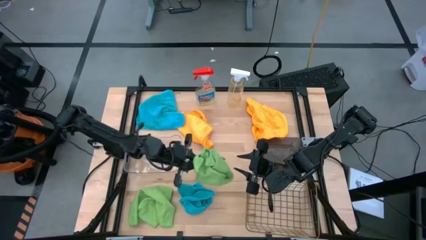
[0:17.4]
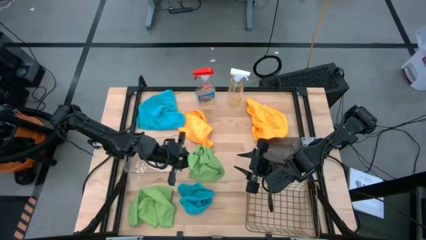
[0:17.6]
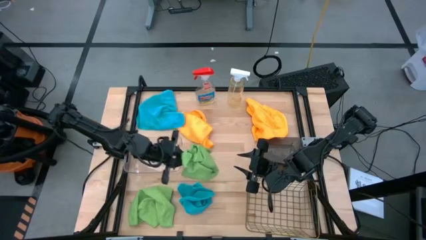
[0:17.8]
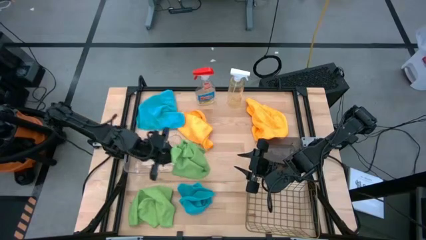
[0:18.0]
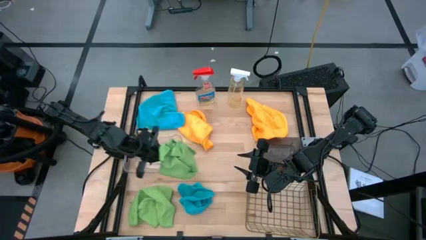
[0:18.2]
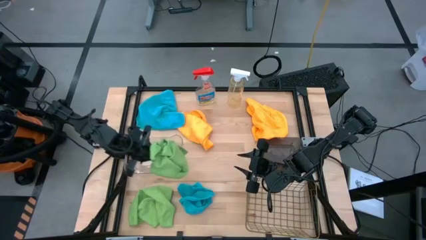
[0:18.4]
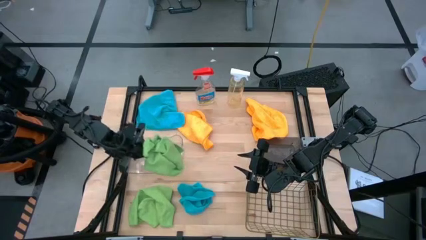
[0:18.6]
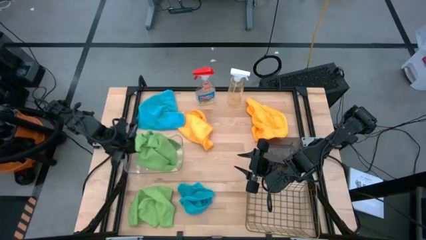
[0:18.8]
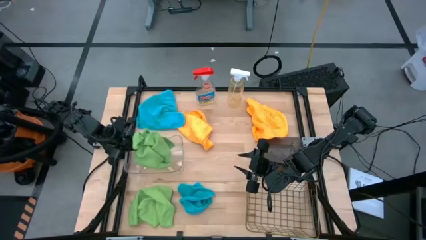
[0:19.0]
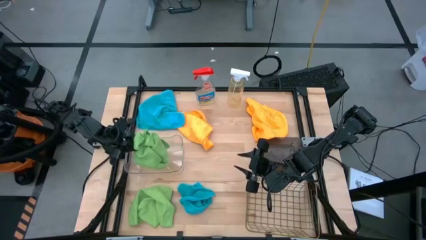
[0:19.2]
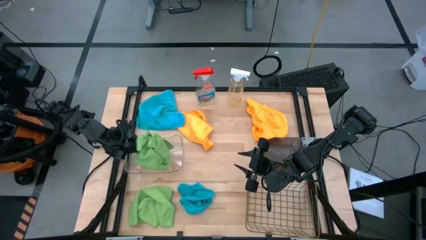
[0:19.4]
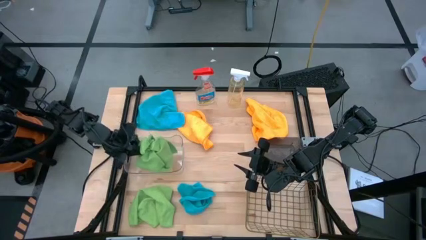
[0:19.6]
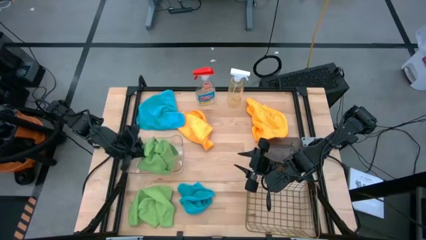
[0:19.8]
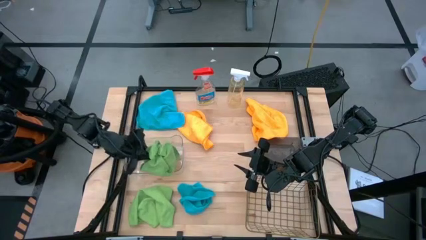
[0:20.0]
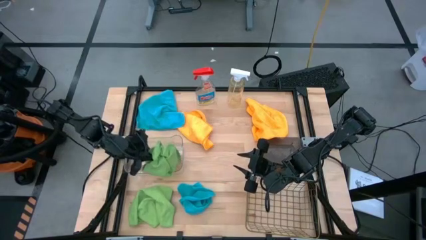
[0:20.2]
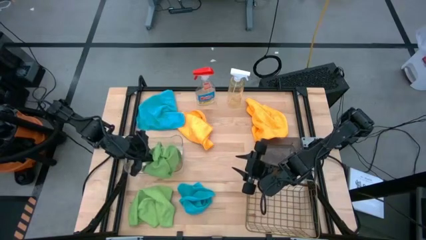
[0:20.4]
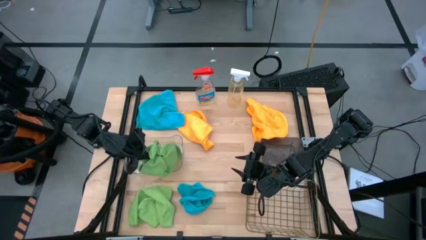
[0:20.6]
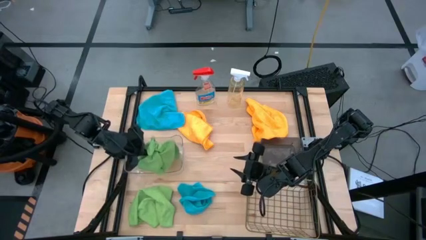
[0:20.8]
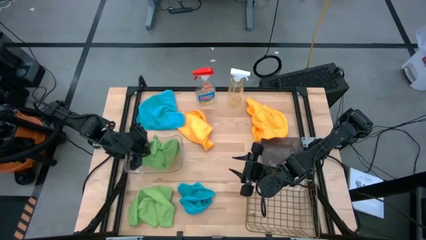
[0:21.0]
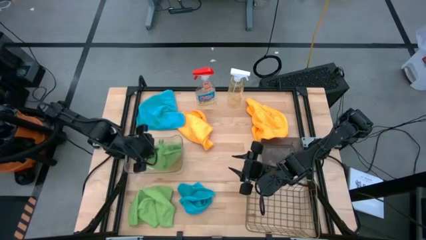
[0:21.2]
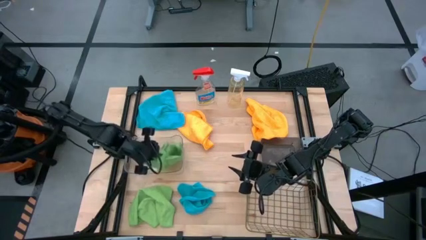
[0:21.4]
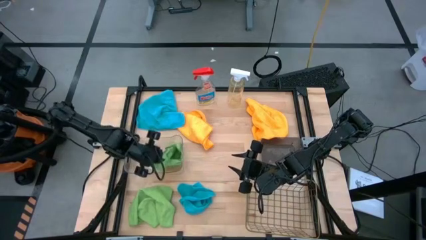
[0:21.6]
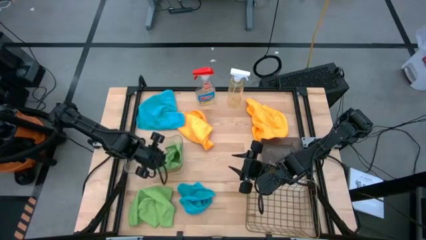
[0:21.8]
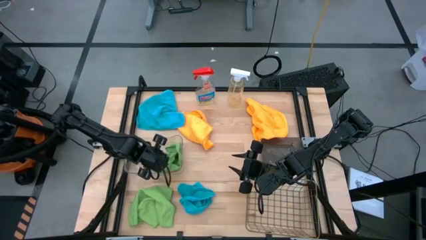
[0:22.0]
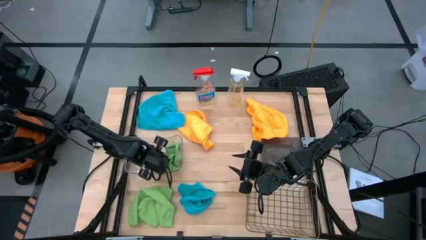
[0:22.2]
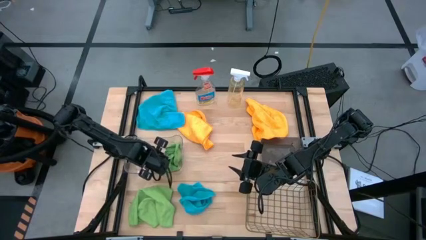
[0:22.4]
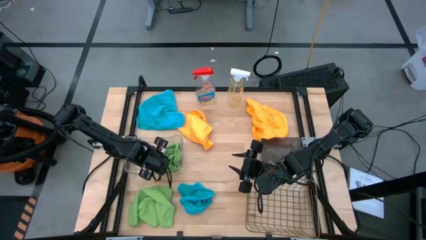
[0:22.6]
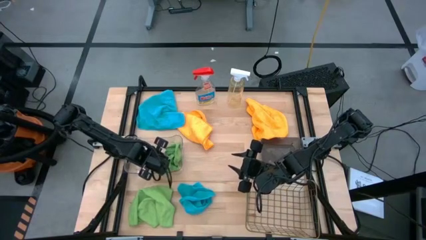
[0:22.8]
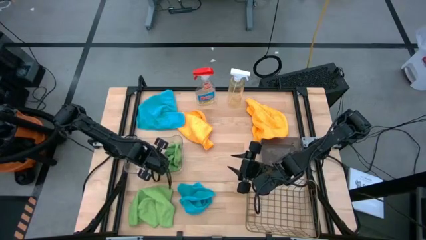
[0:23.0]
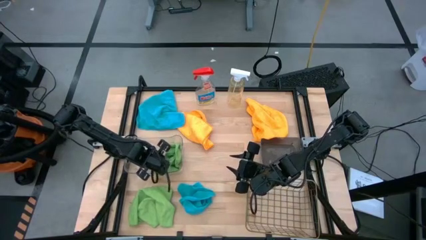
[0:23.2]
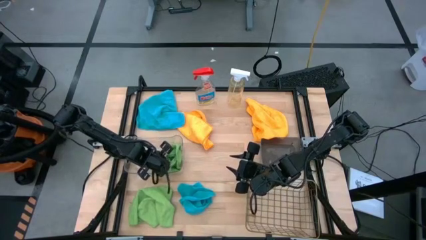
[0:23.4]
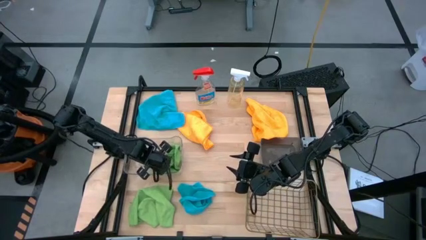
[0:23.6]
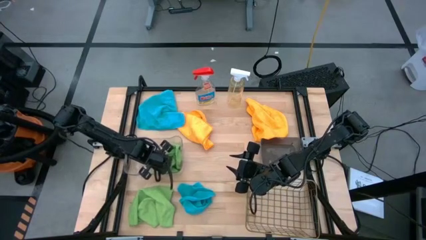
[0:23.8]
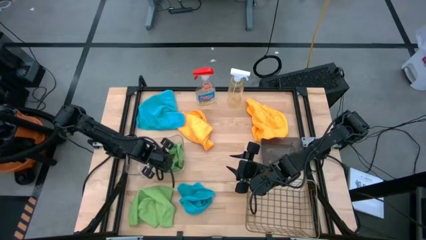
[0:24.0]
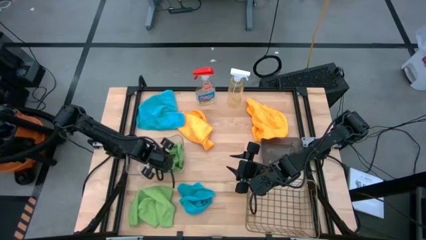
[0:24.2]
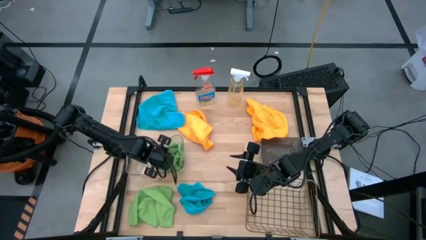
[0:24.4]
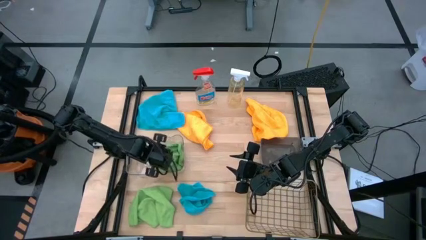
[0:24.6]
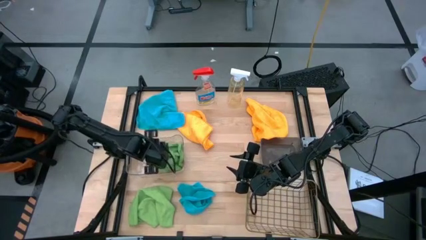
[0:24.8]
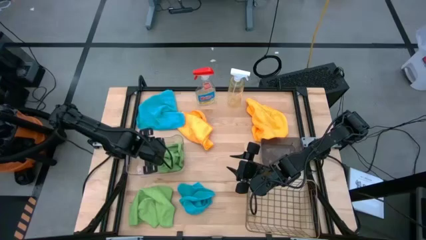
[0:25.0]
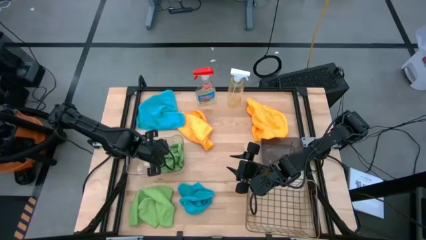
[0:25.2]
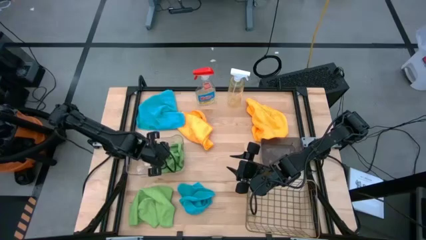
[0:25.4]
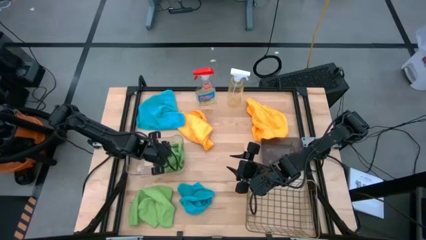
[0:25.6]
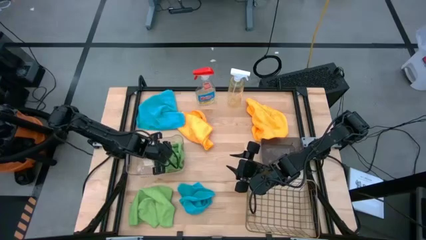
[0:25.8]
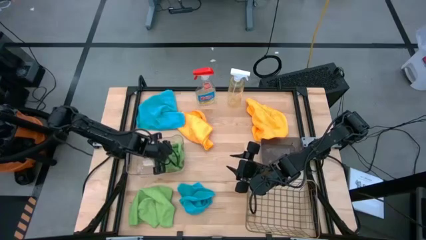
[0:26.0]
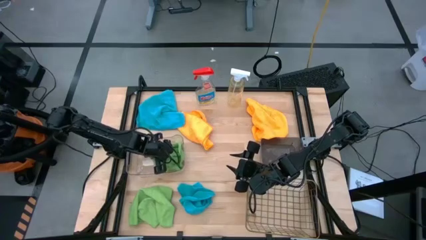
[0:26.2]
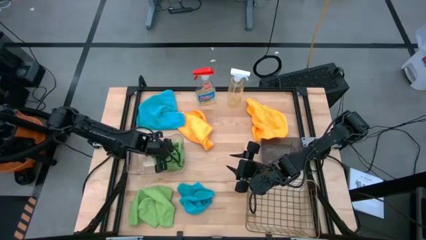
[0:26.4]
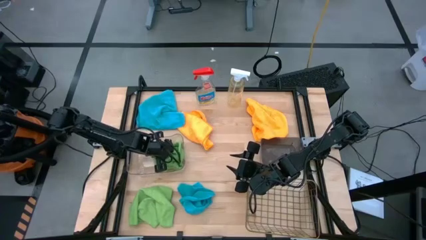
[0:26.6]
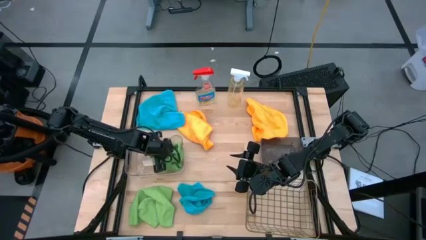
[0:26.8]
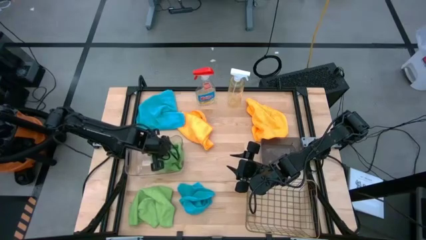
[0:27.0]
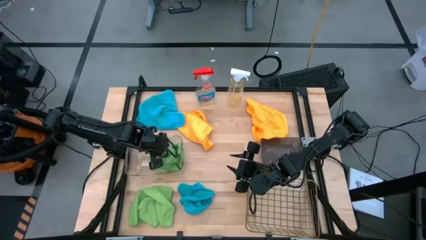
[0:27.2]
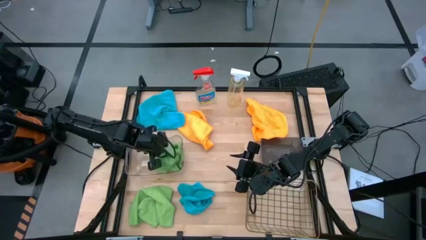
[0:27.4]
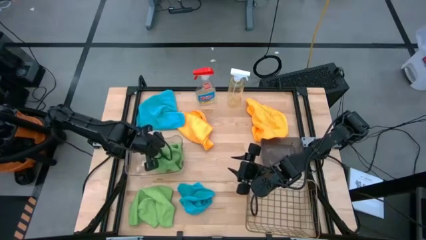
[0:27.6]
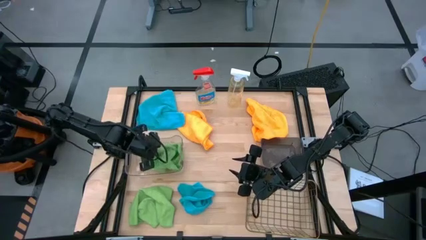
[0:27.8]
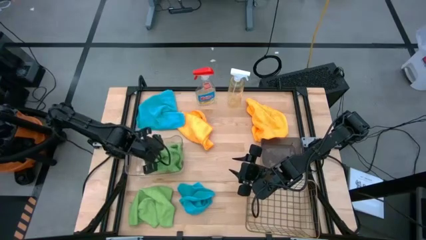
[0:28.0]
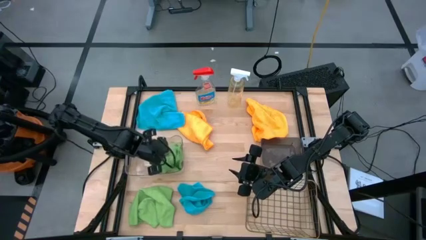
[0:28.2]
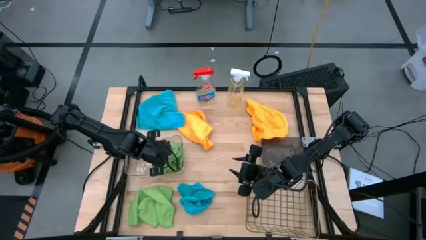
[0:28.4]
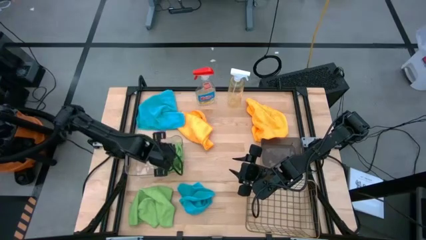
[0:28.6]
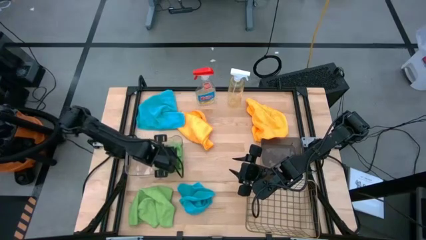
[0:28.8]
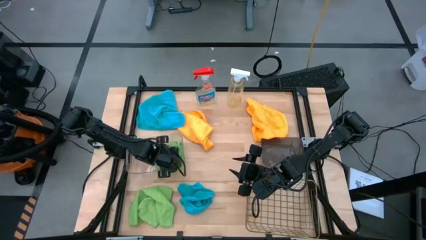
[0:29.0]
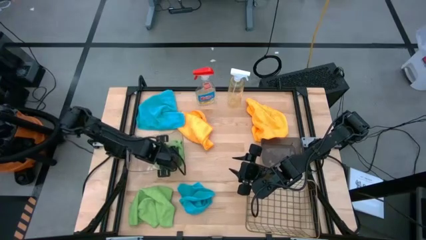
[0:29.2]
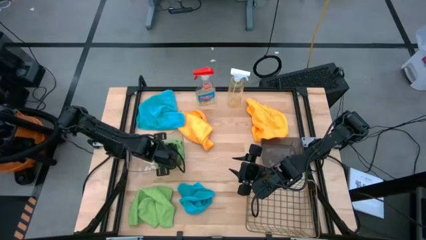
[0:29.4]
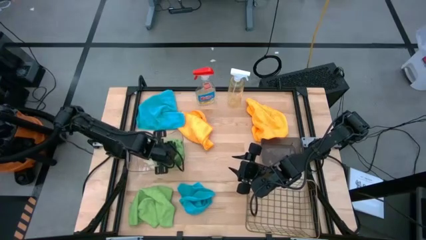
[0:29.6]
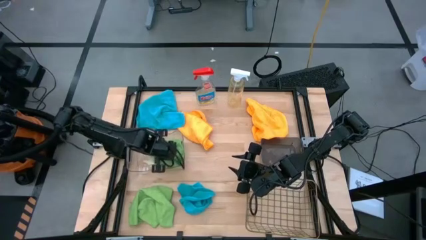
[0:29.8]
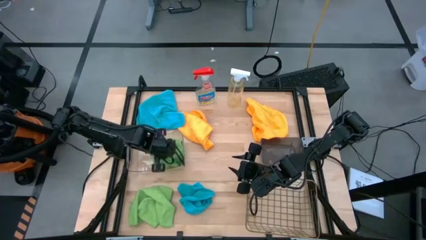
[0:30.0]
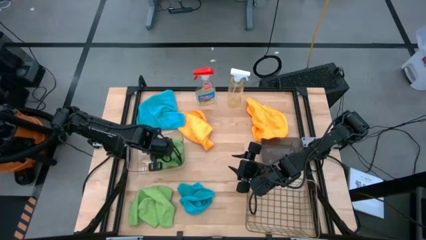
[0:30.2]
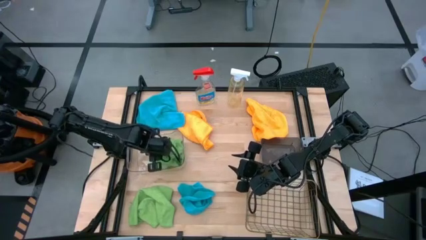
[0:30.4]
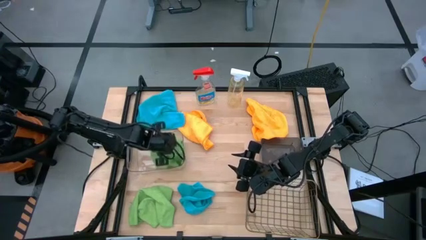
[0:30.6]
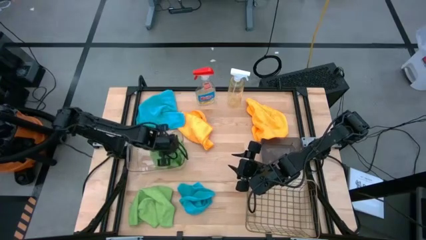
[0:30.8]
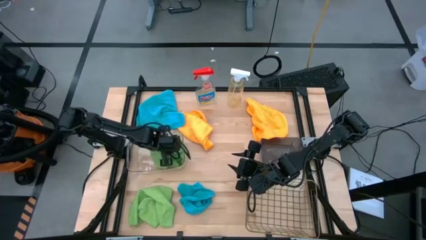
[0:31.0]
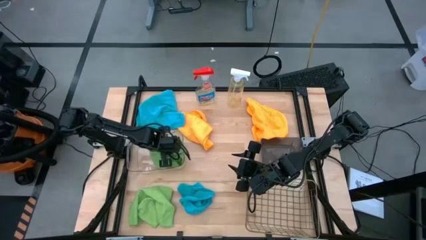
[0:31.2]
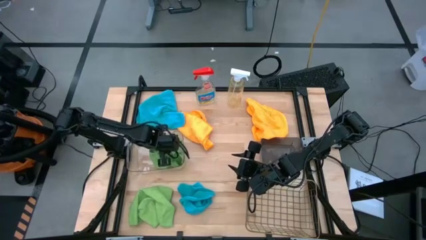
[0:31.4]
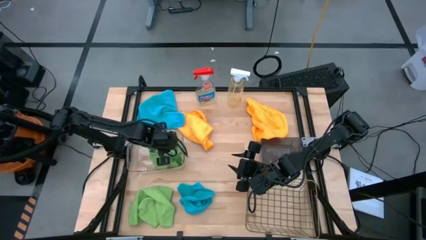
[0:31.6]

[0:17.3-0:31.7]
Task: Sort microfiber towel by color & place in baskets
Put the right green microfiber cloth into the transparent bin
